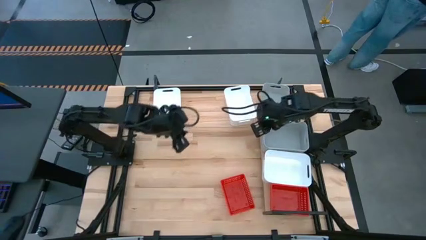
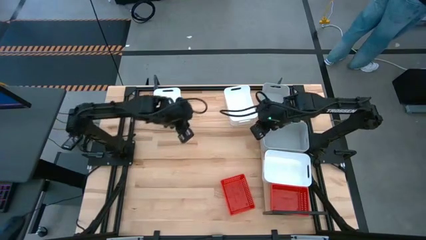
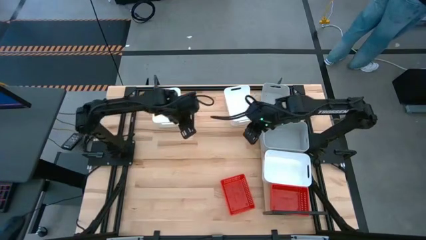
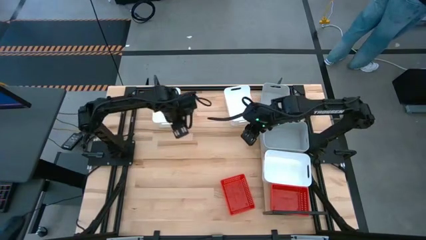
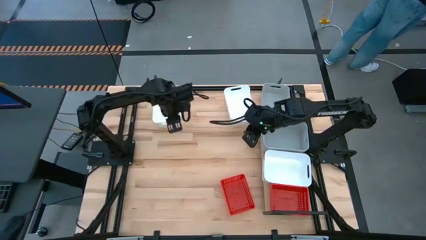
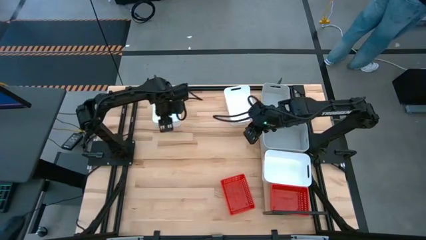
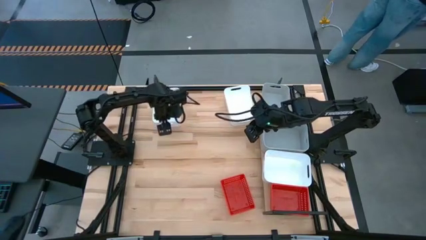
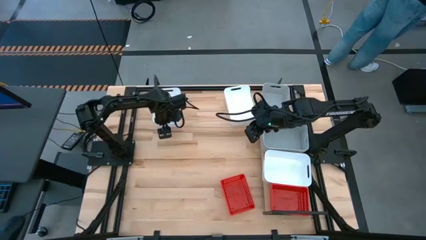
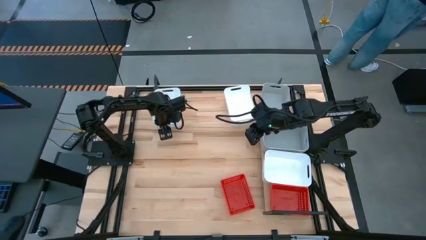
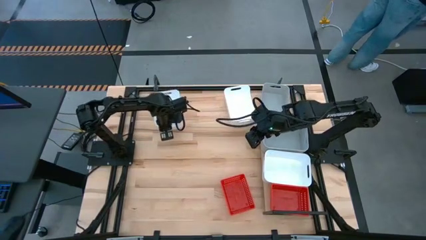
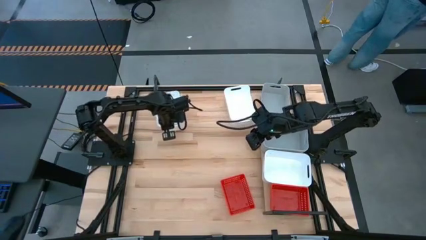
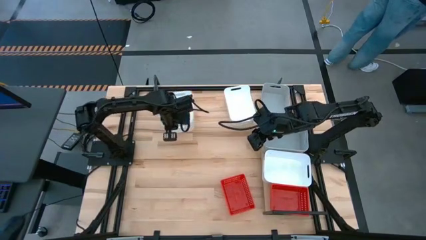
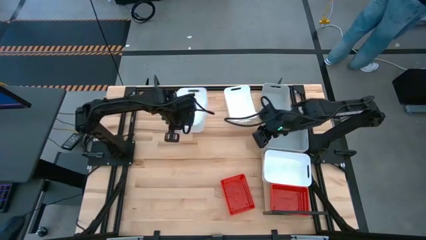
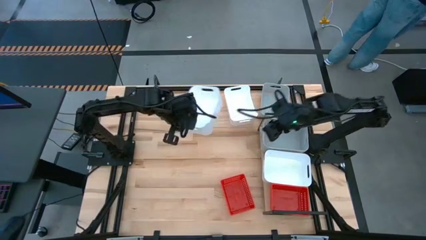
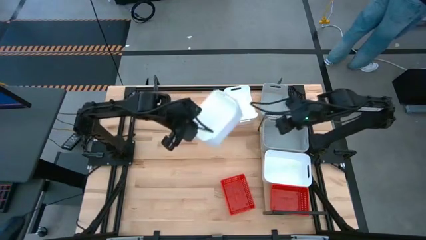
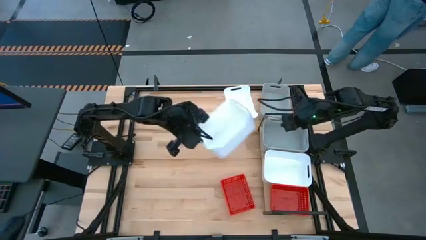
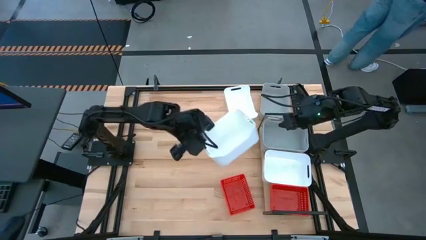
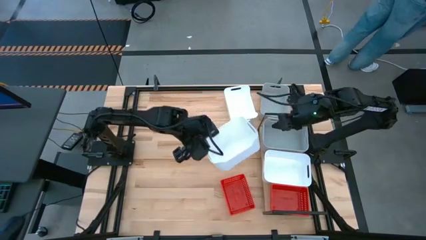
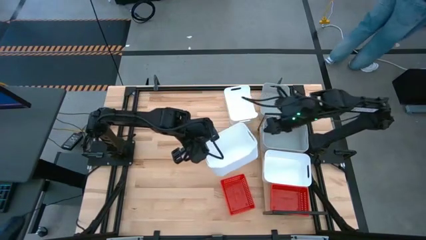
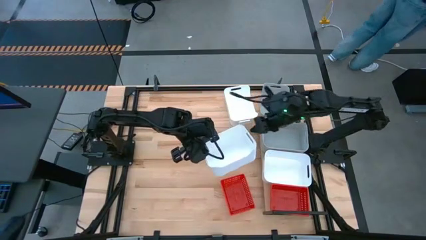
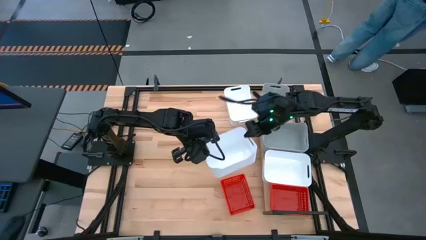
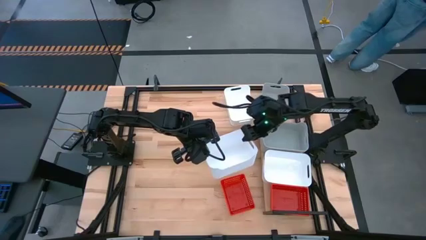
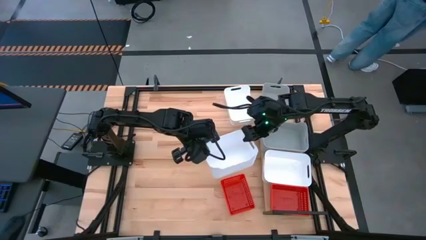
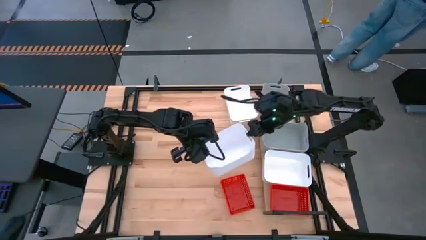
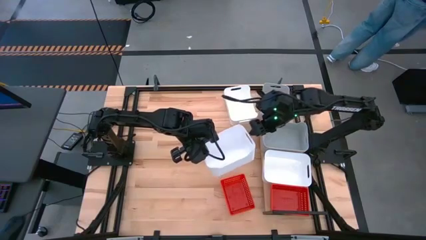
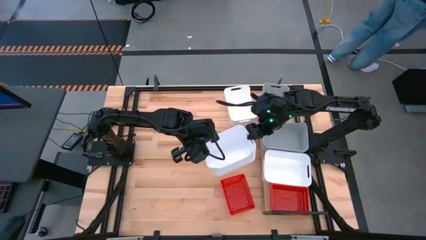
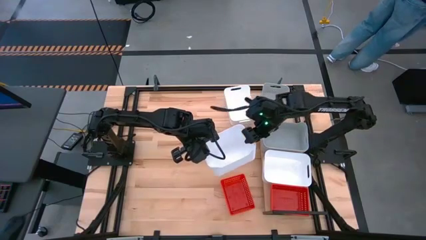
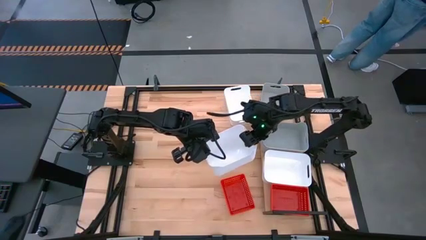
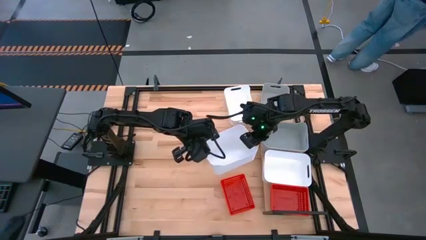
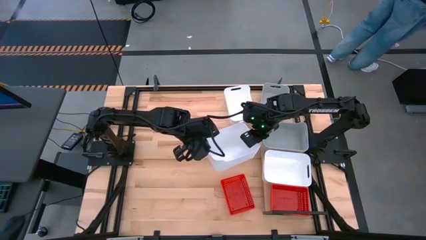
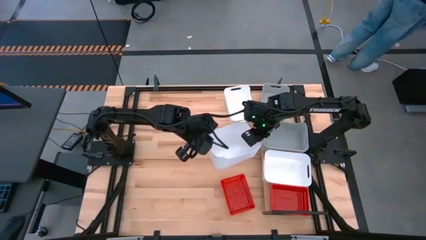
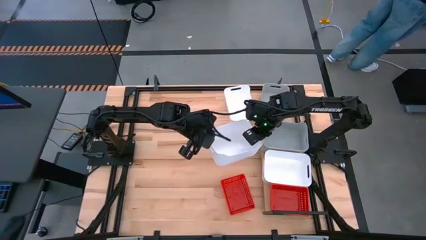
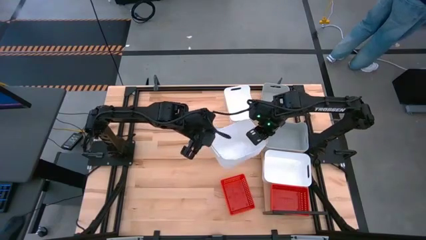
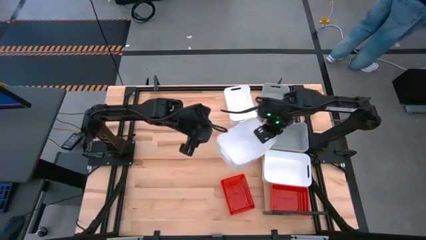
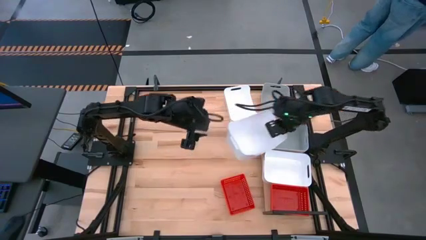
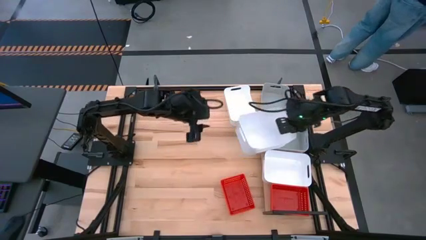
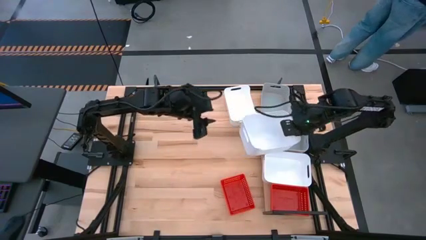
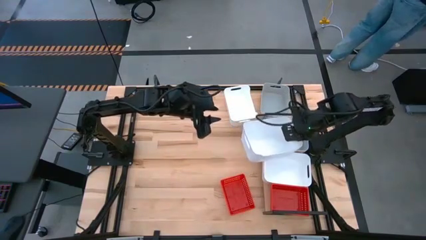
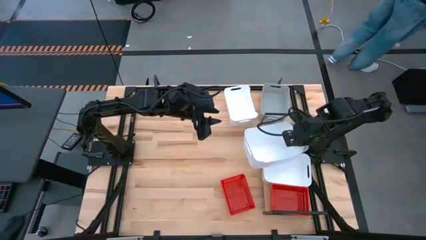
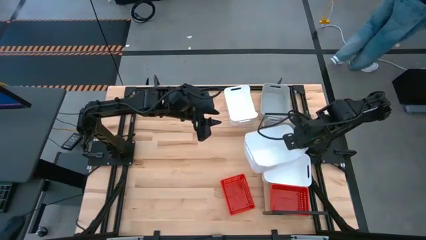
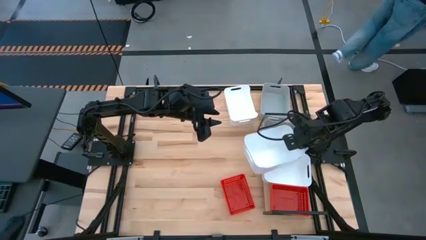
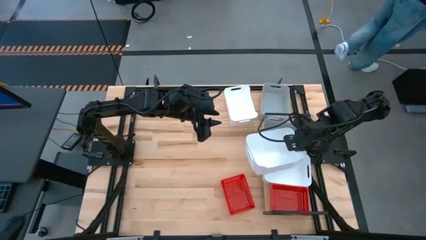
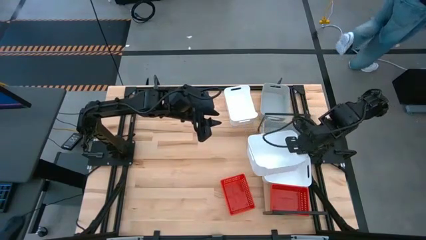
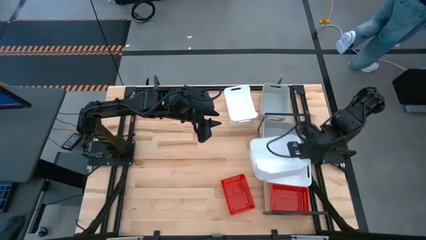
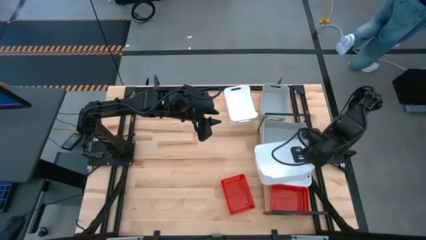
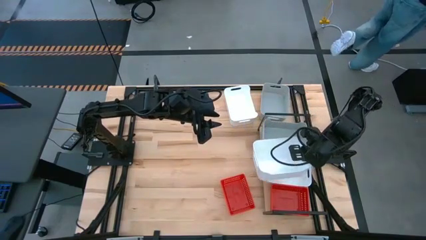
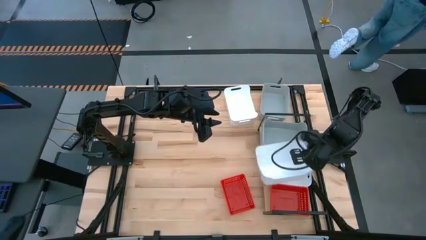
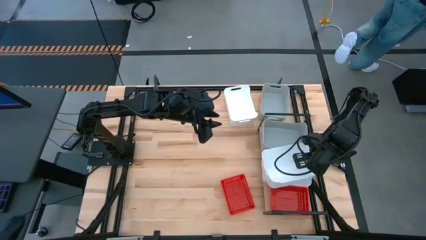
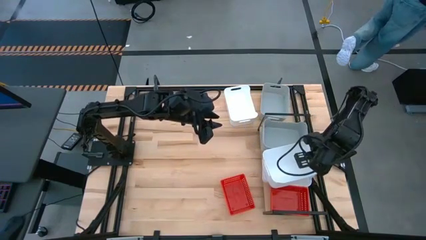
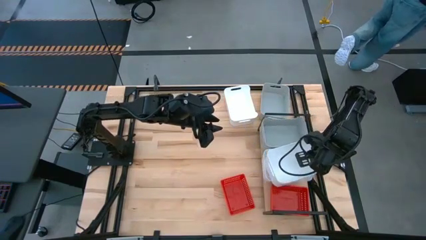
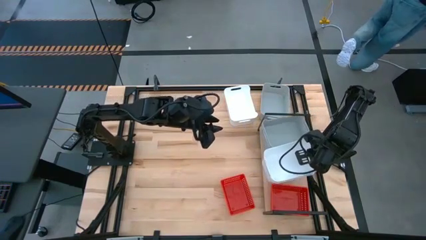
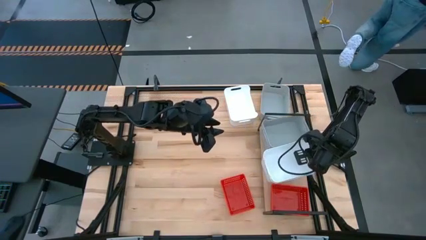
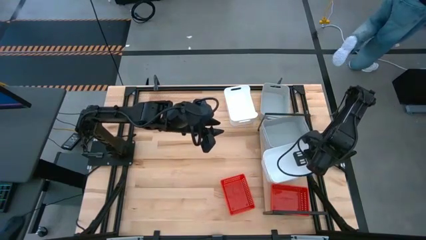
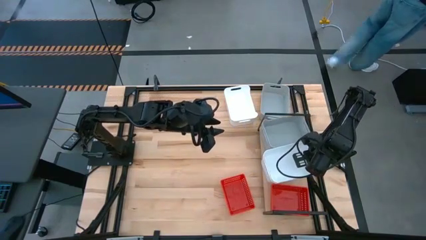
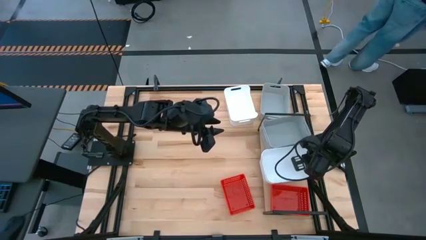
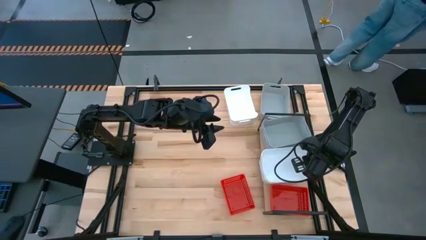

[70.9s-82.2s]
Task: Stack baskets on shelf by color
Stack the left white bin on top of the white bin on the shelf
